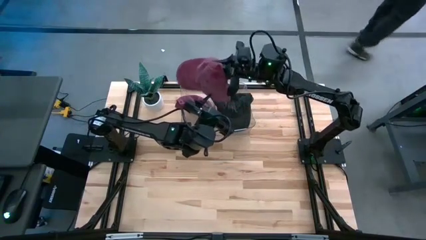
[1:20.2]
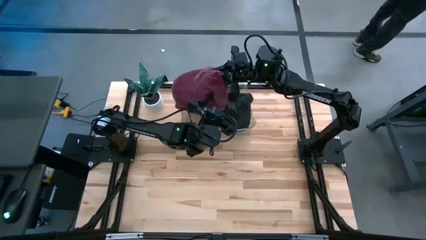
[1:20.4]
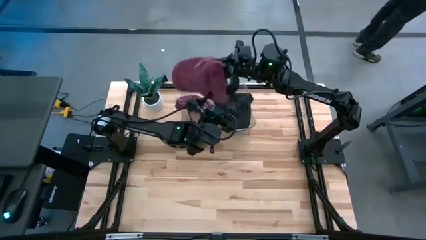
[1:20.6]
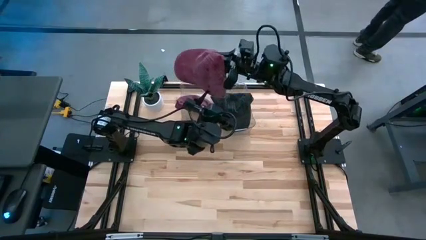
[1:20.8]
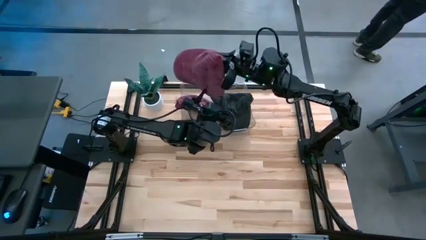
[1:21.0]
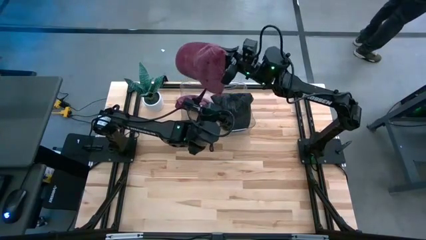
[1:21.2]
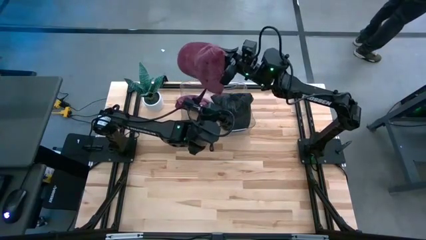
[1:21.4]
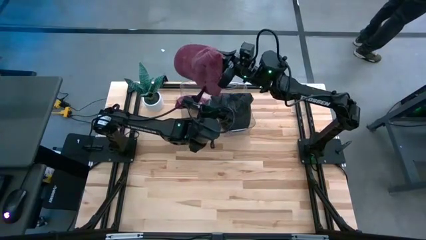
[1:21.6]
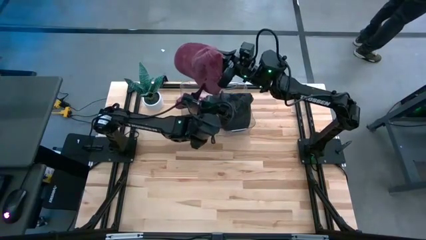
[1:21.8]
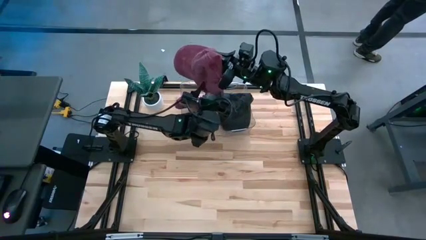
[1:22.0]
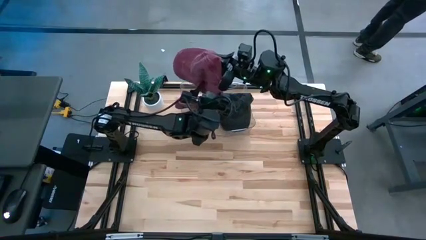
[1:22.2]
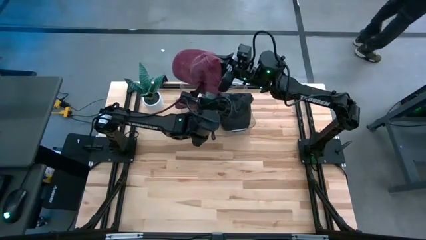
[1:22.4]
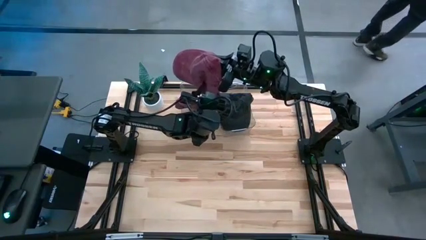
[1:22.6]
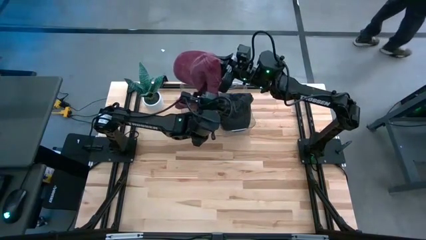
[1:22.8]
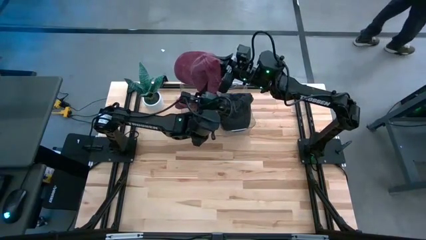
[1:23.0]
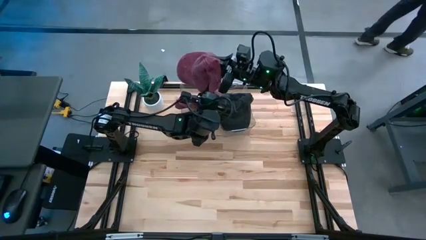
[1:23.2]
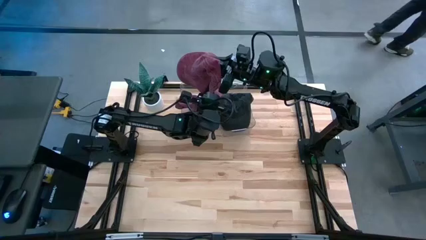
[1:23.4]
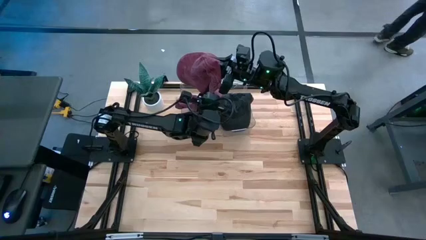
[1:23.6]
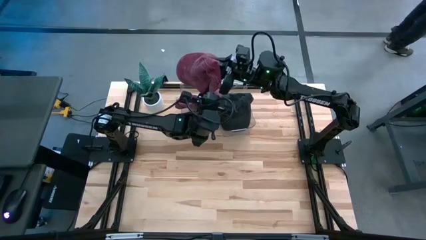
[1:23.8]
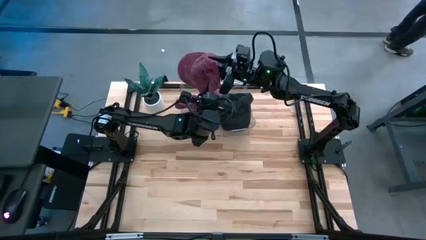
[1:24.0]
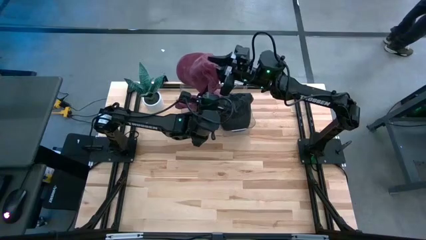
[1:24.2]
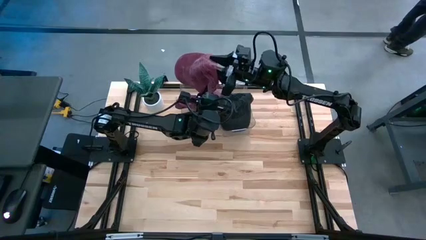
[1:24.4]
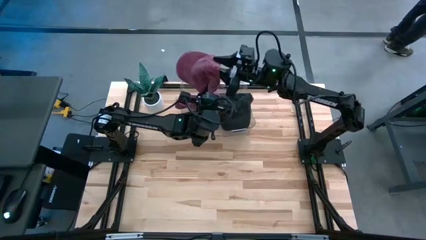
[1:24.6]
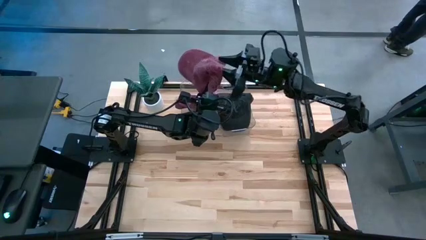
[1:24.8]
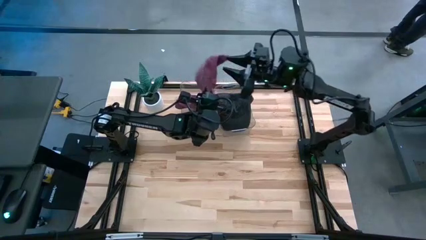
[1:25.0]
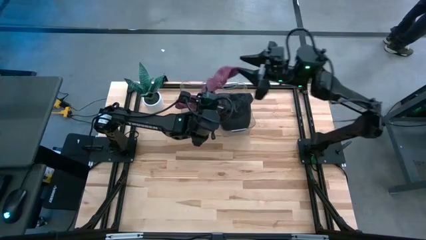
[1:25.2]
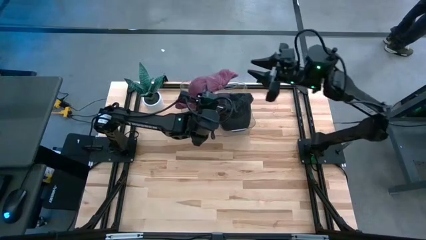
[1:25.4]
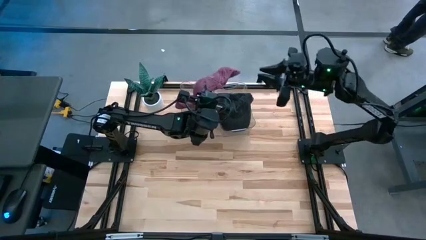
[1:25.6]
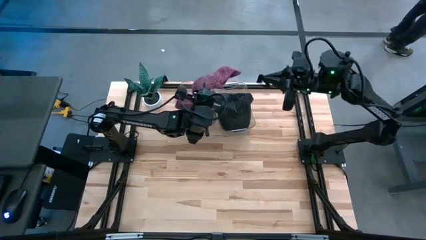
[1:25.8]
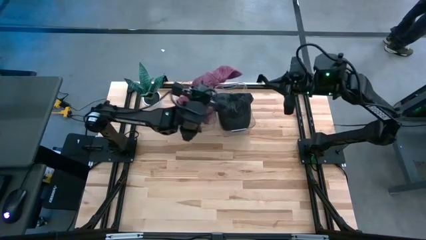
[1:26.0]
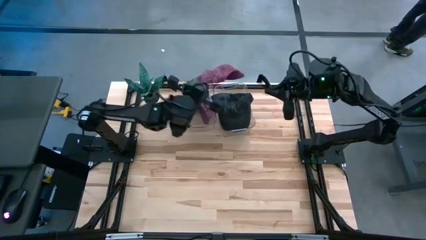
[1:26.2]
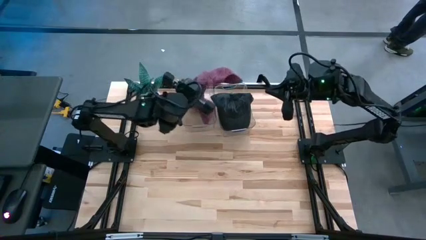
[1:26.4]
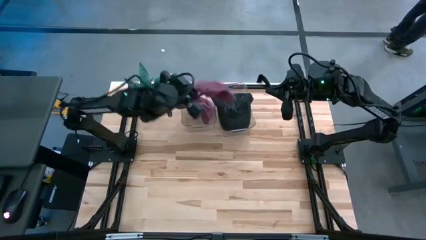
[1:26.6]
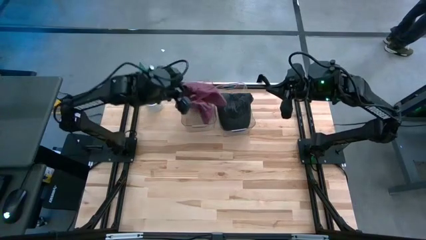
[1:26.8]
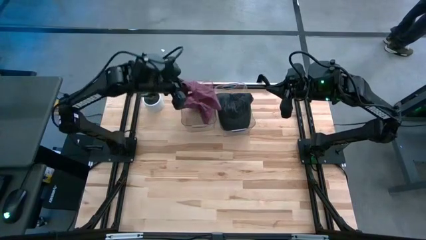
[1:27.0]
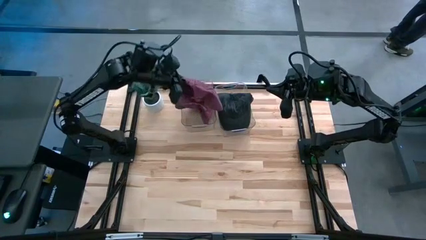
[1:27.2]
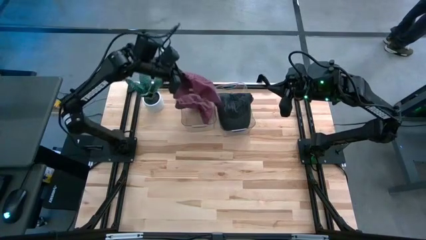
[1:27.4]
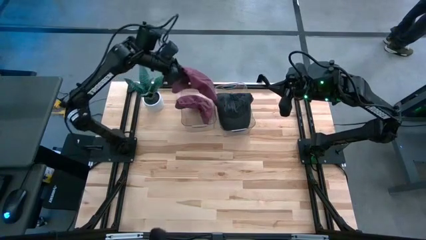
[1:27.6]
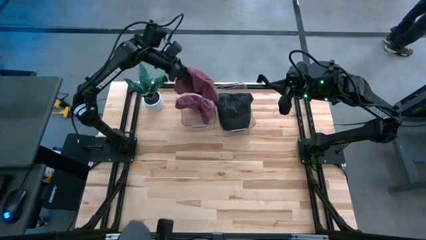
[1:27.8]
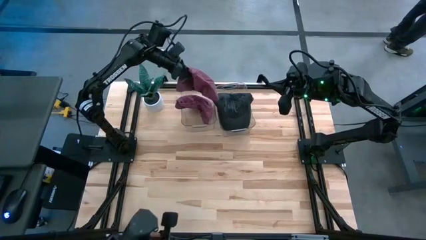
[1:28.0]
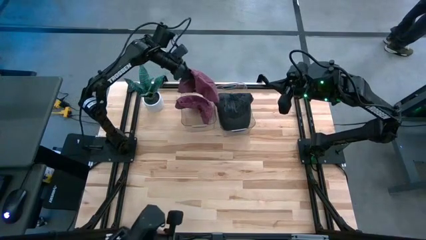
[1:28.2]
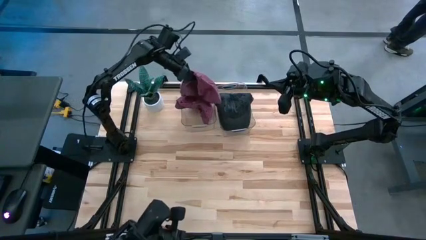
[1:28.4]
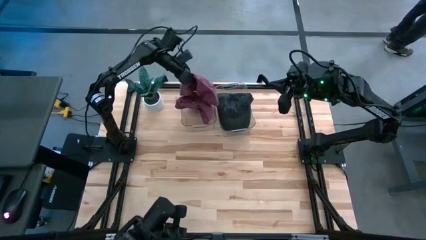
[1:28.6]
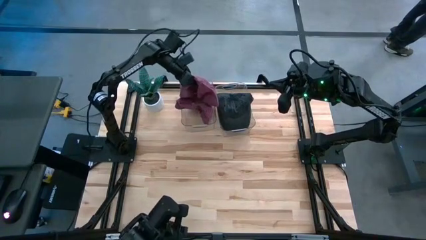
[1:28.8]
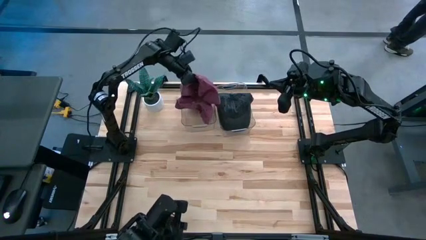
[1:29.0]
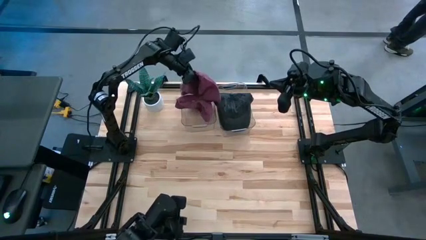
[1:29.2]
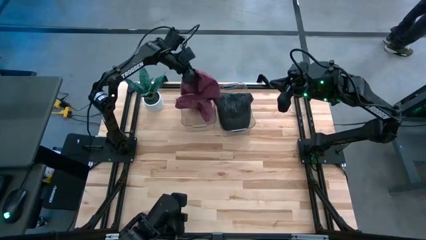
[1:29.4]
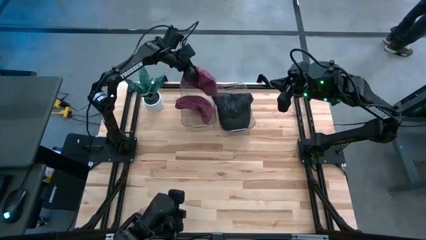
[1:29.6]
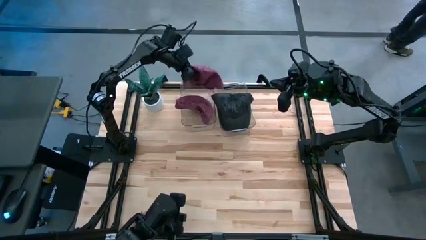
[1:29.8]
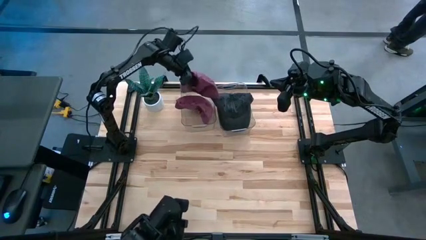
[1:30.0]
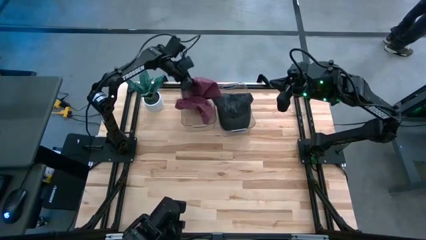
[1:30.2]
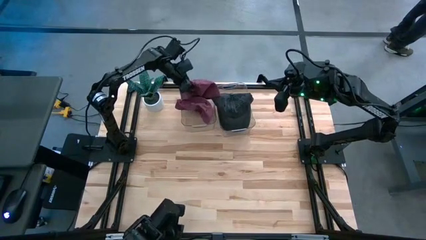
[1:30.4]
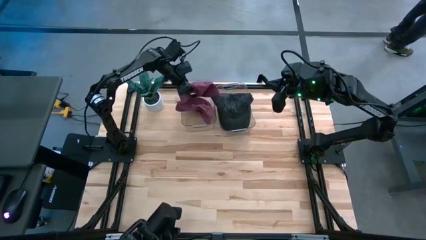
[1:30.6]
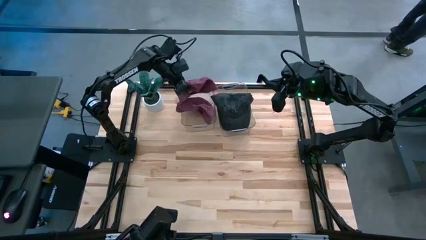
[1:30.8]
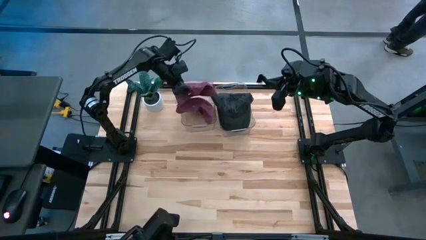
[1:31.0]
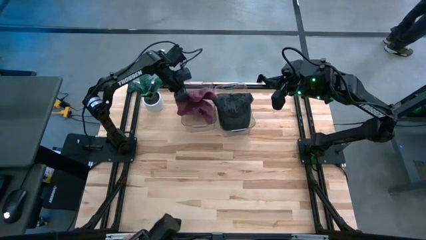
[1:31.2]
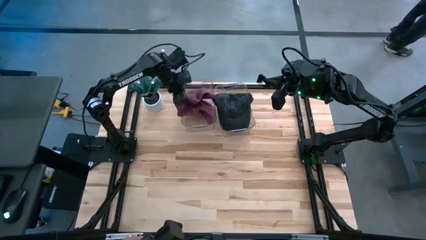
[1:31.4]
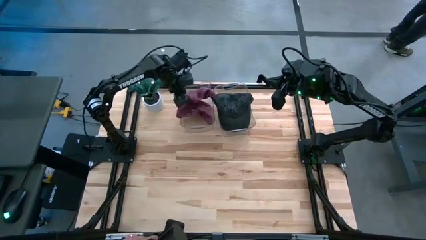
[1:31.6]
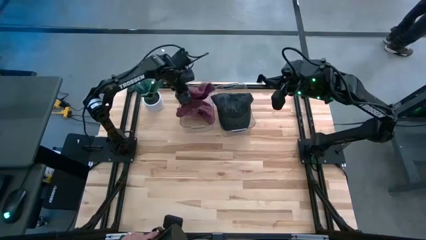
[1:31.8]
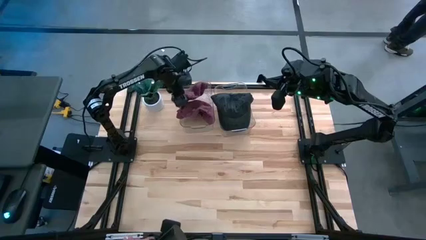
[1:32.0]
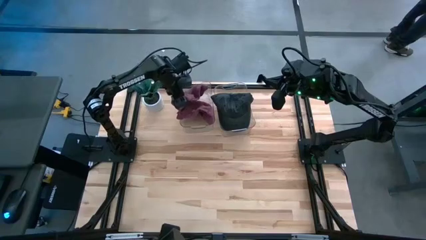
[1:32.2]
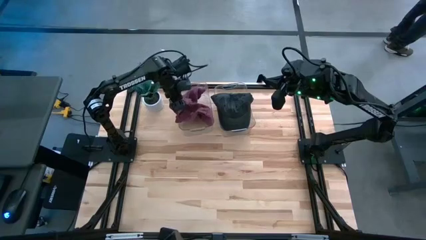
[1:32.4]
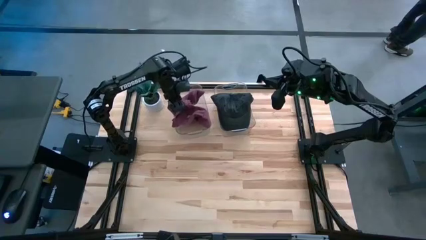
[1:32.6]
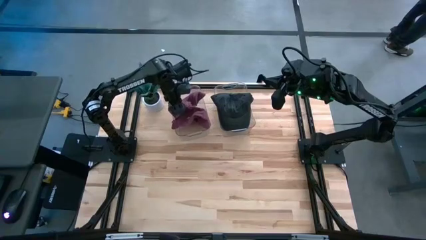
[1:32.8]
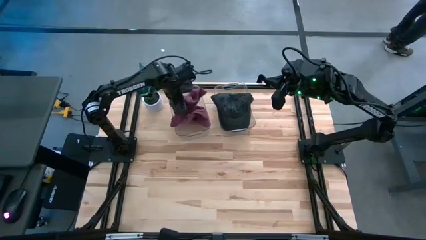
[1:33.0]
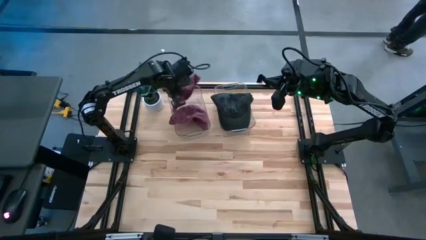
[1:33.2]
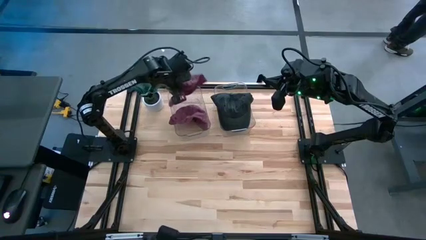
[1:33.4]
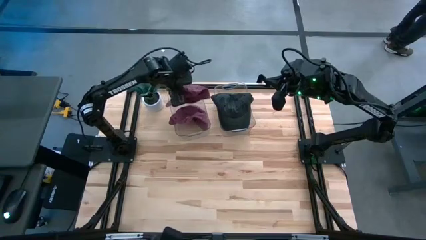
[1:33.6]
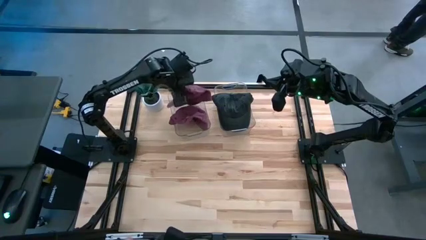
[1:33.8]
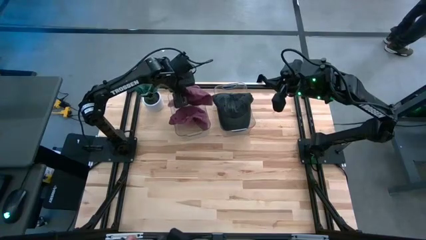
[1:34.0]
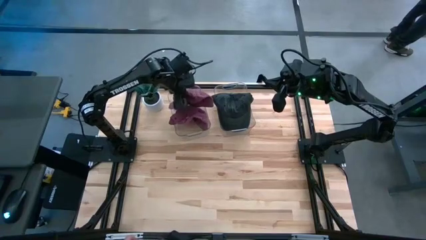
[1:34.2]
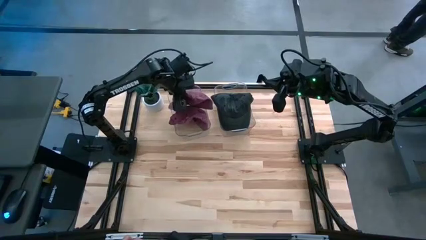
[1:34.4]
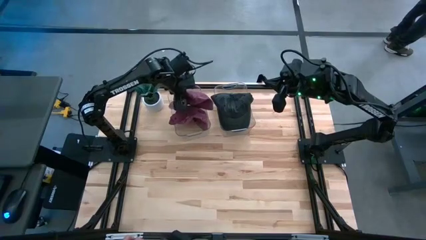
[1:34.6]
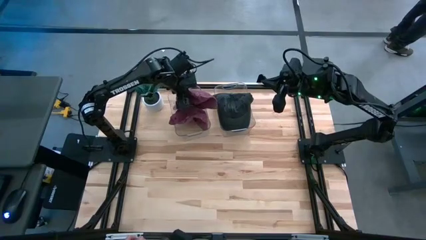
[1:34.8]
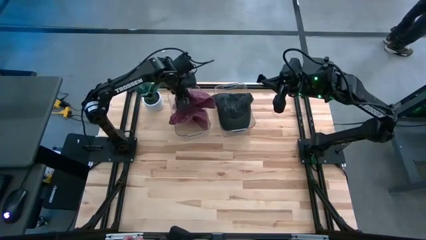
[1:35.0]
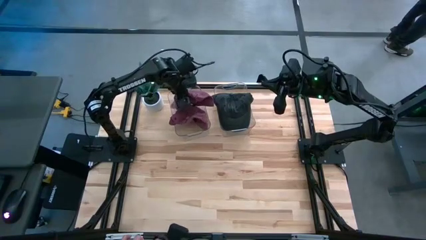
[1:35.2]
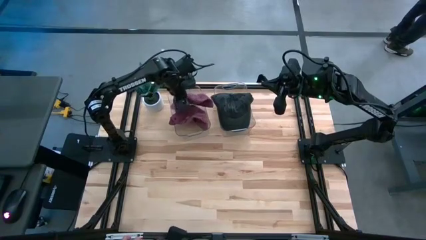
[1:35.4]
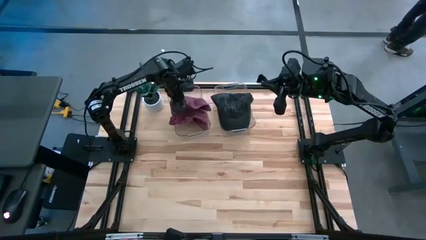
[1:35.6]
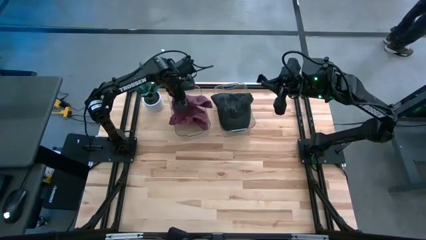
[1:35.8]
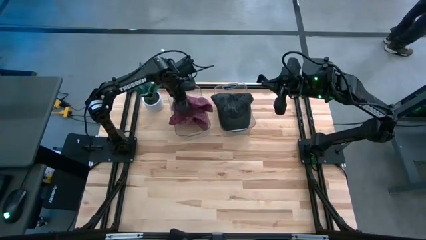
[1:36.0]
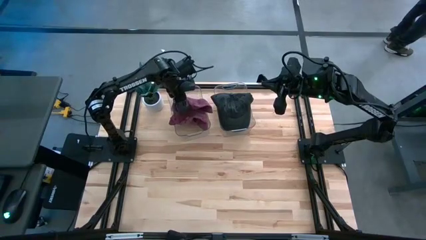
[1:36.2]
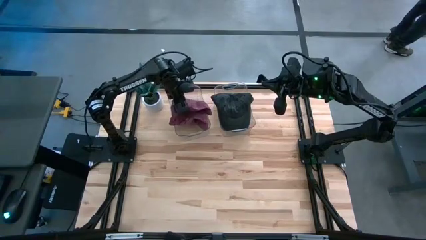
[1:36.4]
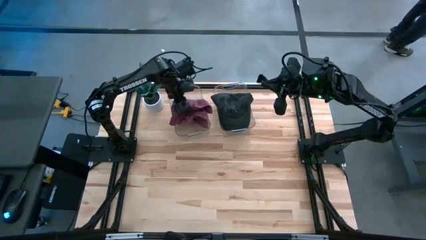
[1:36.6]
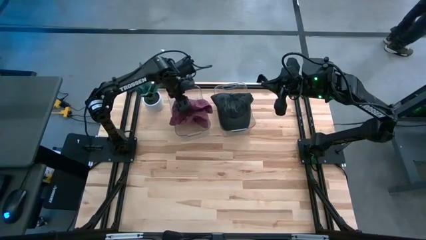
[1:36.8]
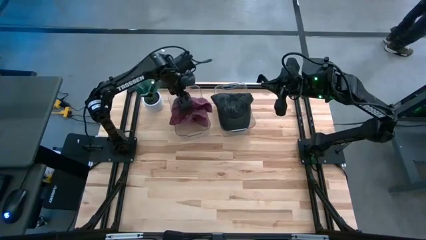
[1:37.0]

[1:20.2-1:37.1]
Task: Pick & Place hat
Put the dark red cap into the left transparent bin
